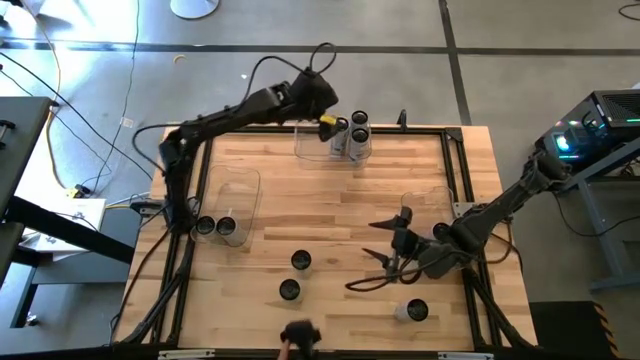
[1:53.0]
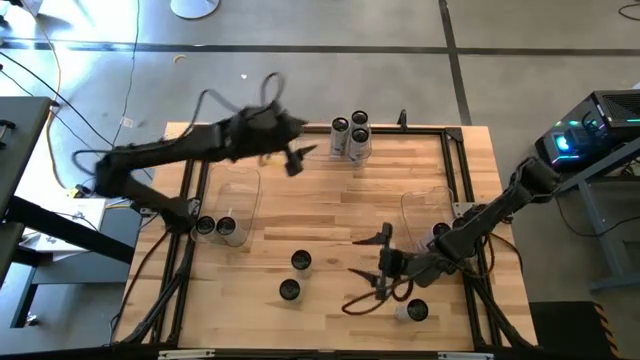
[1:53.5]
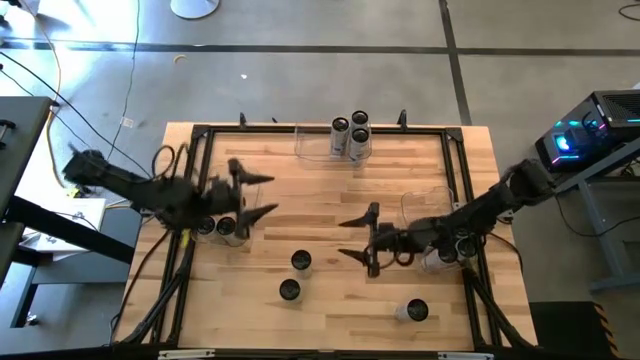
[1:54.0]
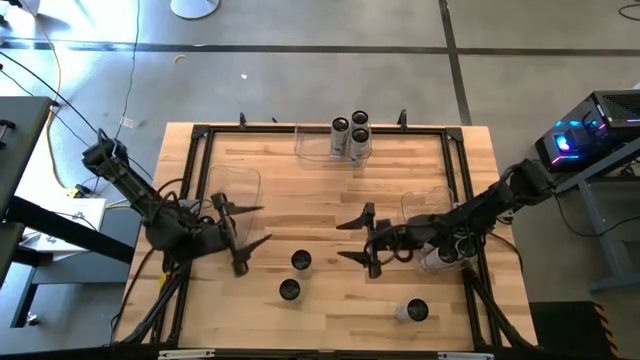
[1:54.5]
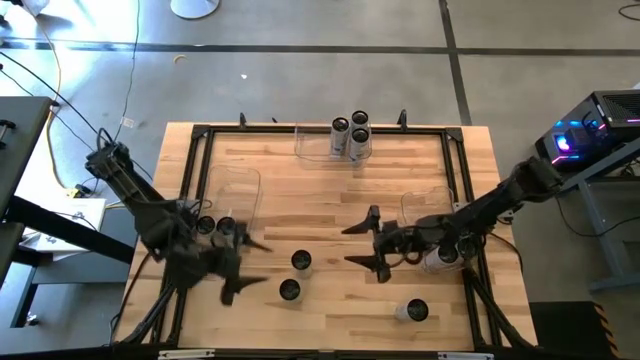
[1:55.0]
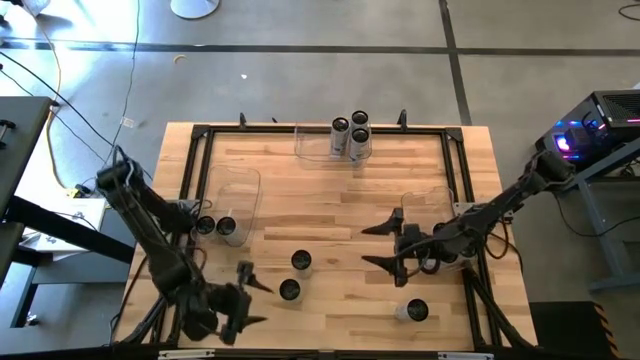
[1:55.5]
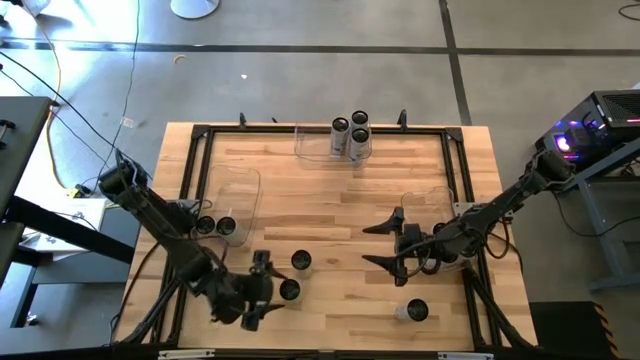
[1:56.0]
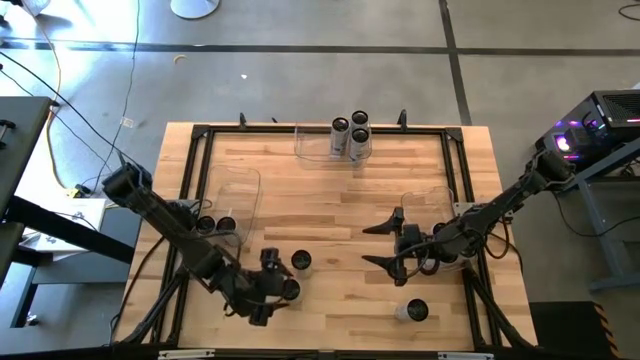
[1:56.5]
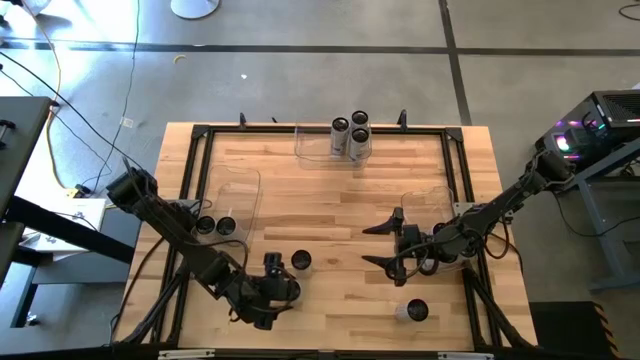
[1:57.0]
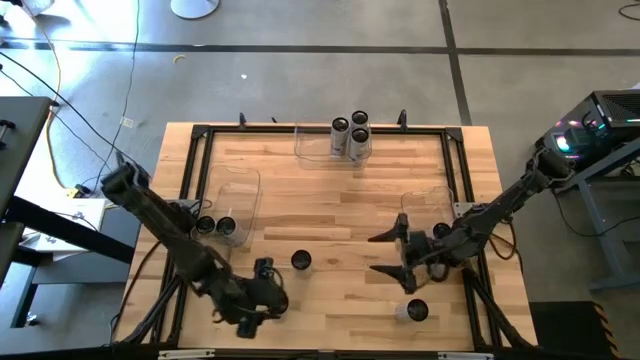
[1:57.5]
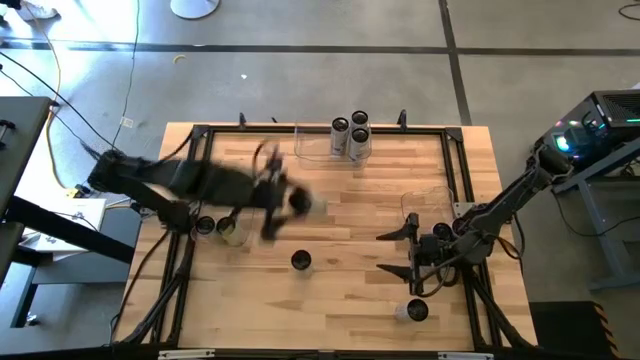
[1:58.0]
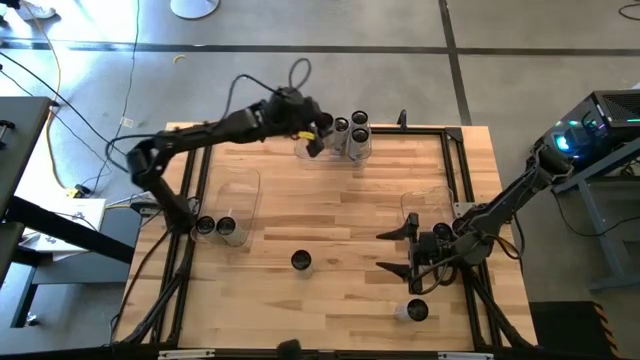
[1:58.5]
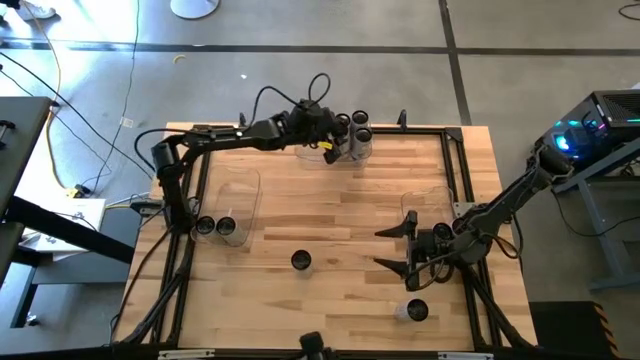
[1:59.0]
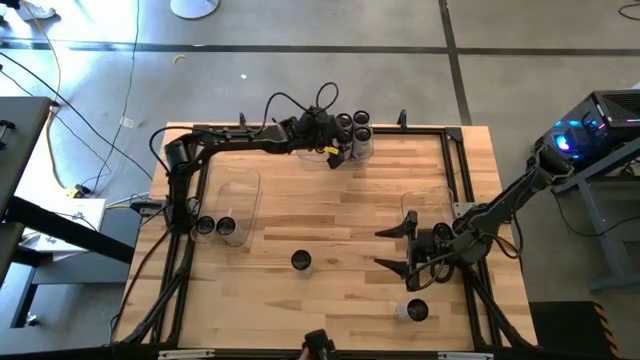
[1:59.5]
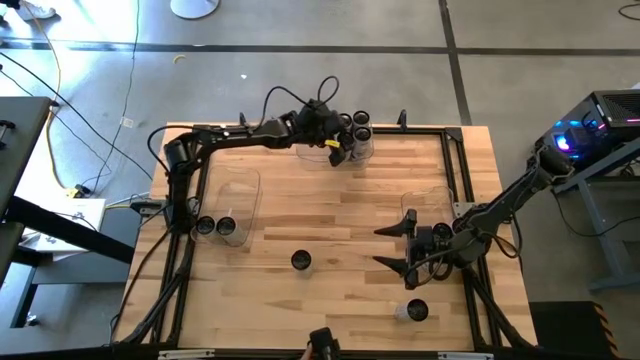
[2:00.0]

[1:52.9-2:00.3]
Task: Sort soda cans
Put the white-blue soda can into the middle transparent bin

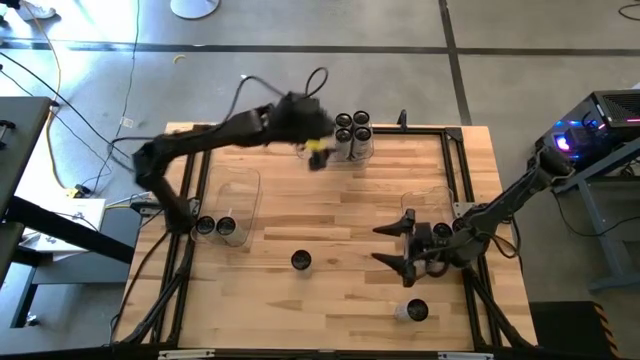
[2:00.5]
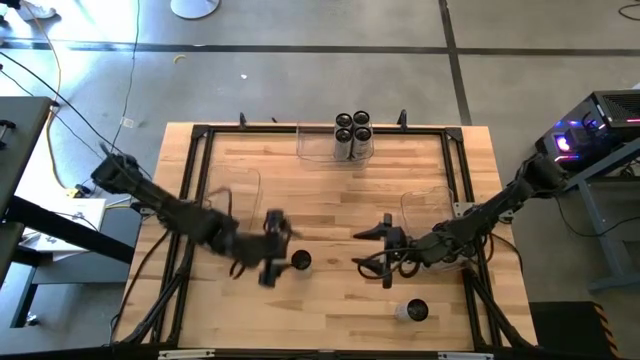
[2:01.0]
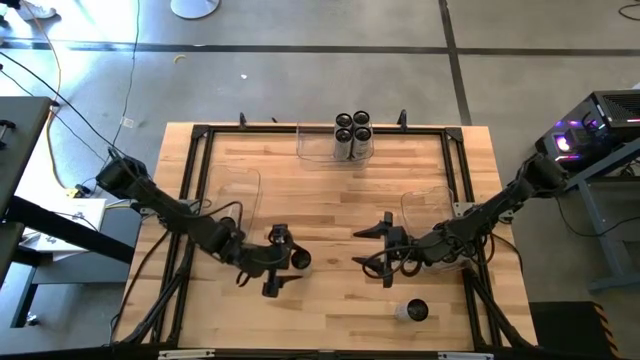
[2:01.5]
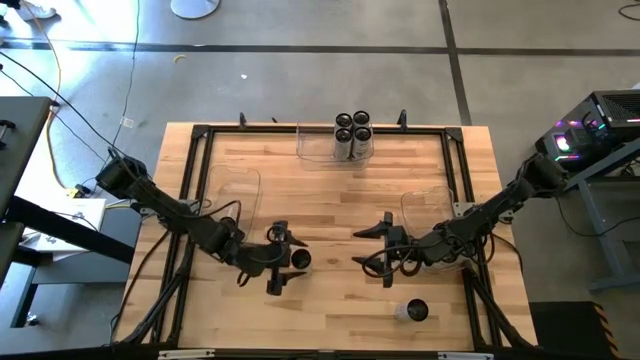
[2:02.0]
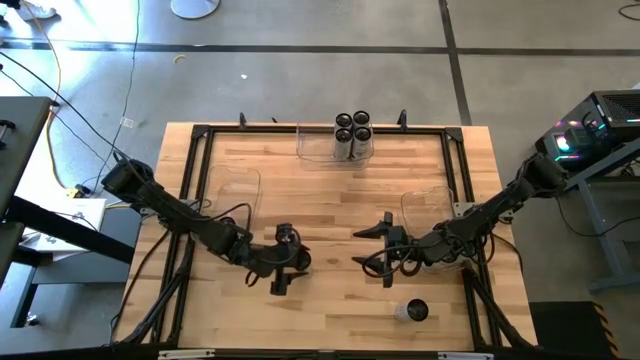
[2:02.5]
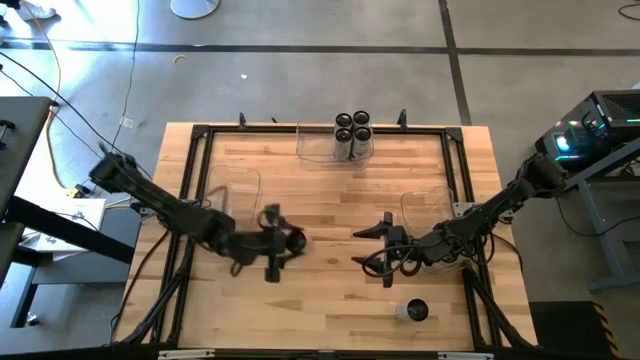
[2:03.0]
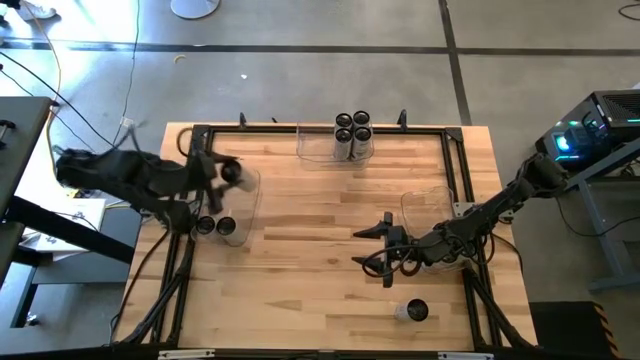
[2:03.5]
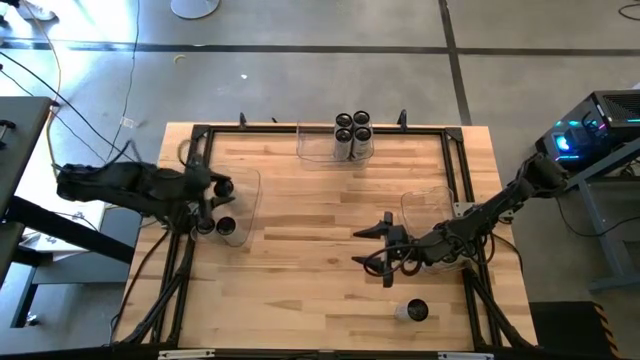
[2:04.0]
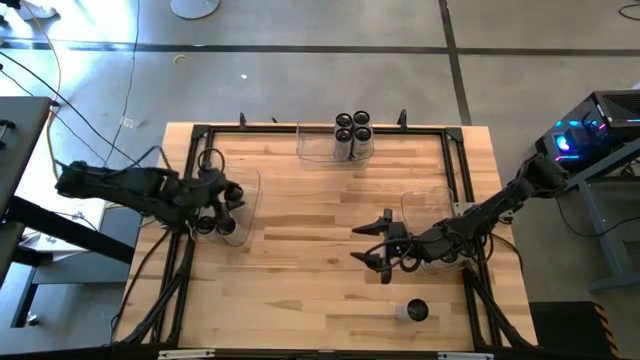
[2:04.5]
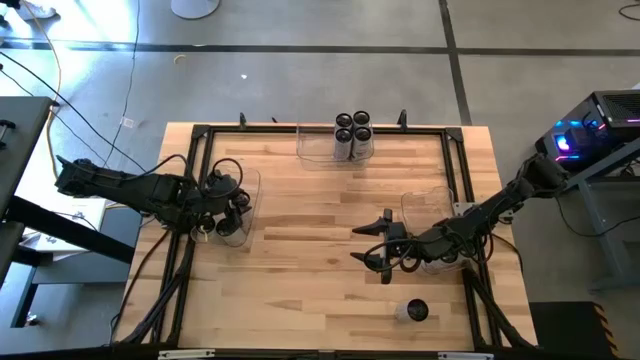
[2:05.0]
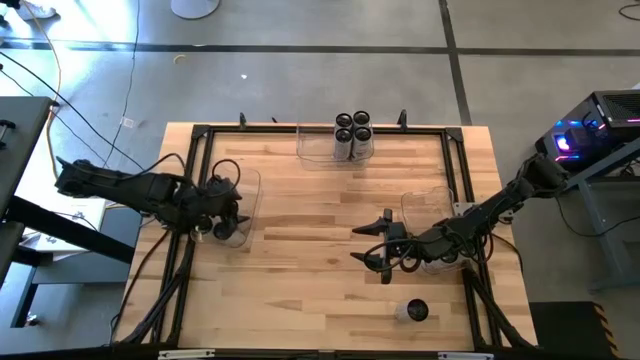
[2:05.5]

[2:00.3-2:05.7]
Put the white-yellow soda can into the left transparent bin

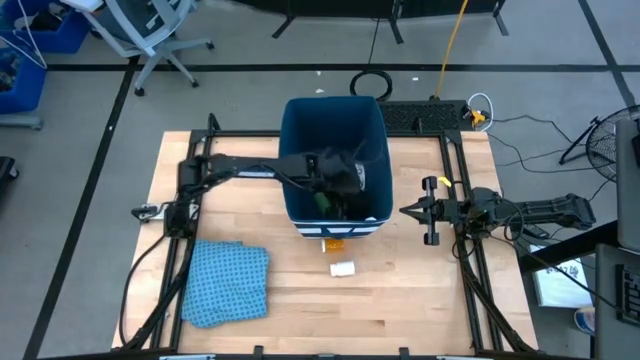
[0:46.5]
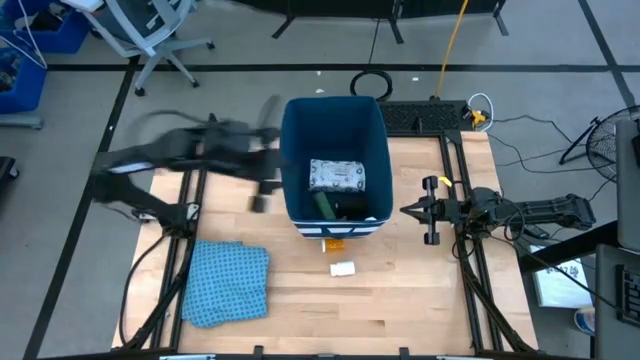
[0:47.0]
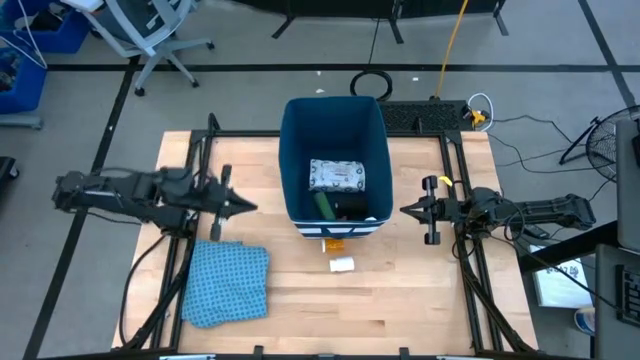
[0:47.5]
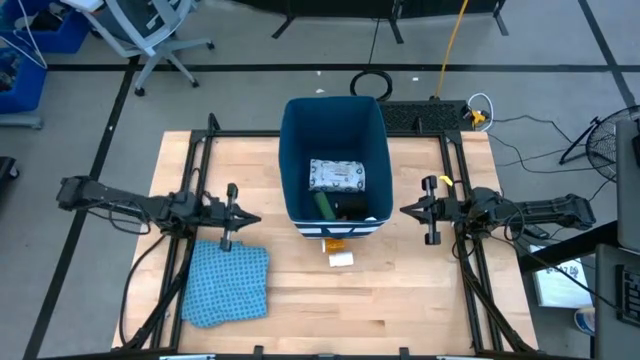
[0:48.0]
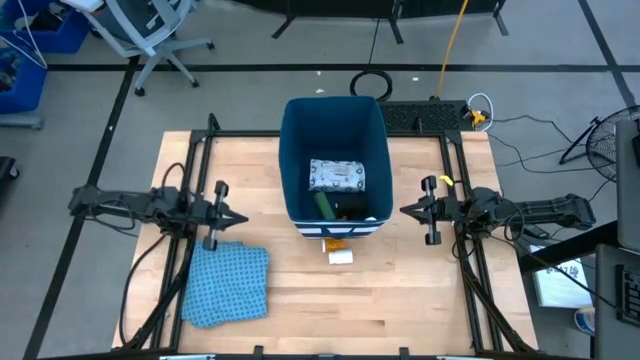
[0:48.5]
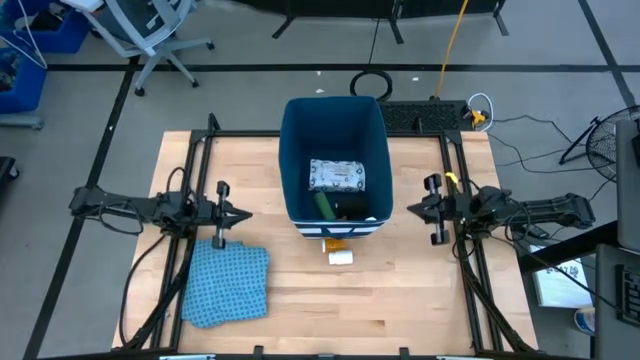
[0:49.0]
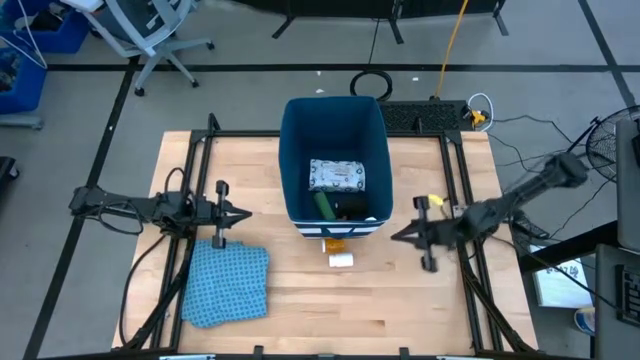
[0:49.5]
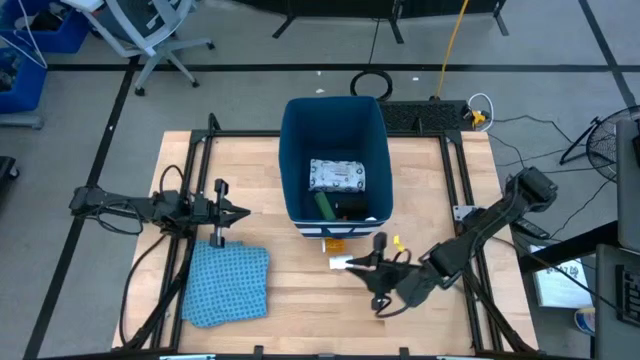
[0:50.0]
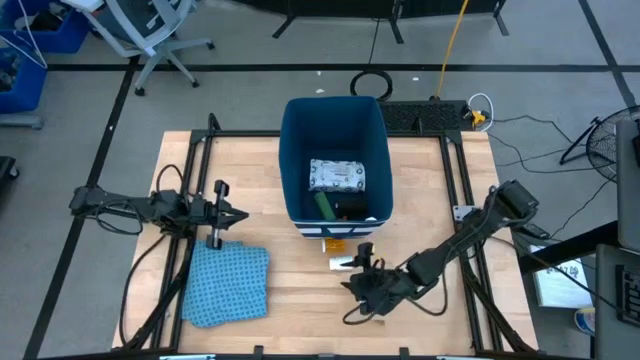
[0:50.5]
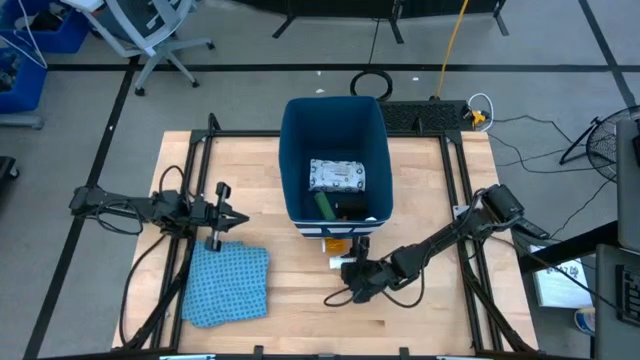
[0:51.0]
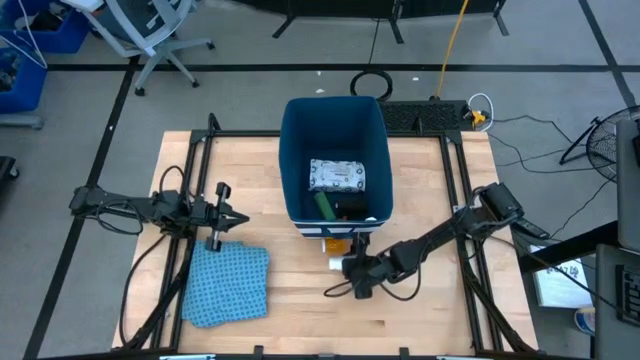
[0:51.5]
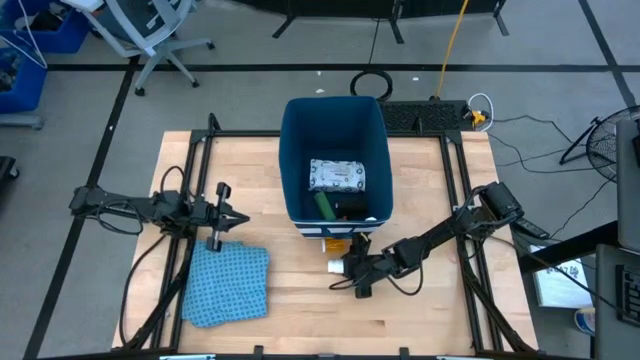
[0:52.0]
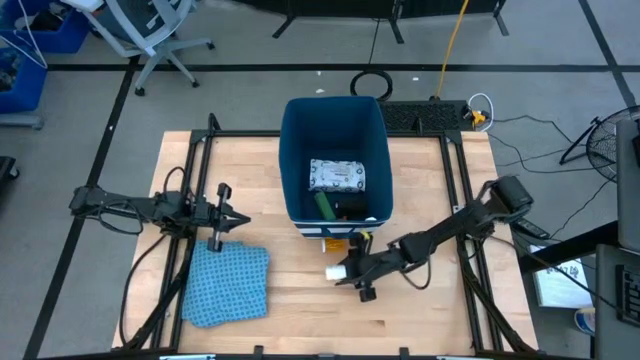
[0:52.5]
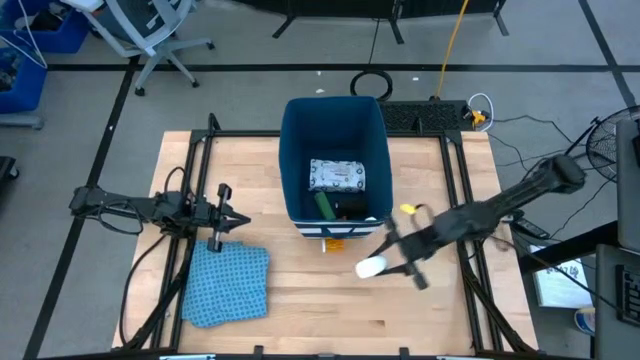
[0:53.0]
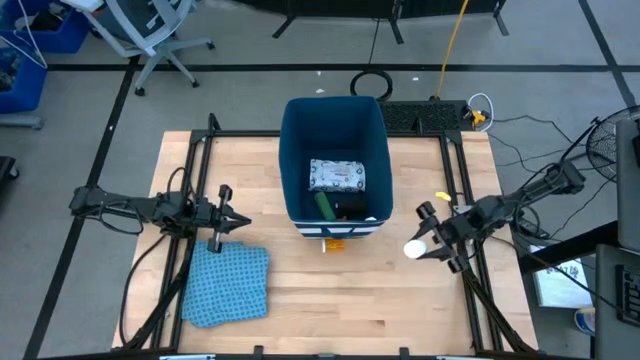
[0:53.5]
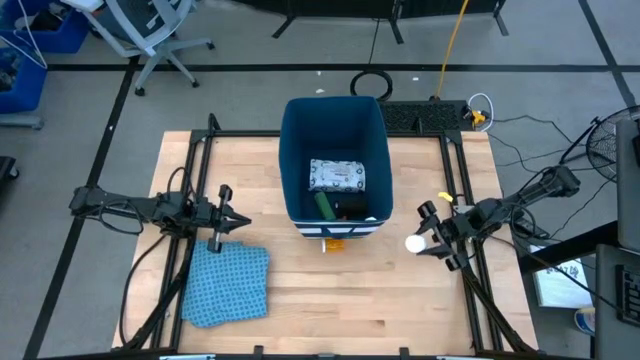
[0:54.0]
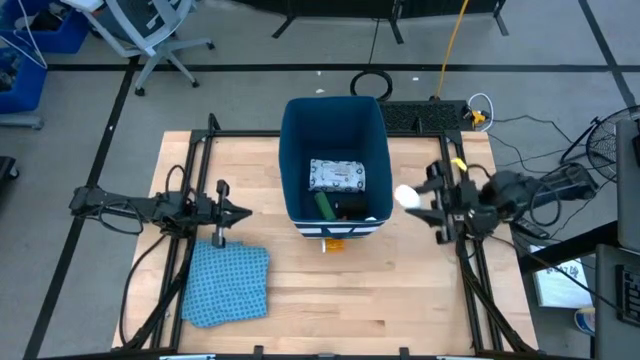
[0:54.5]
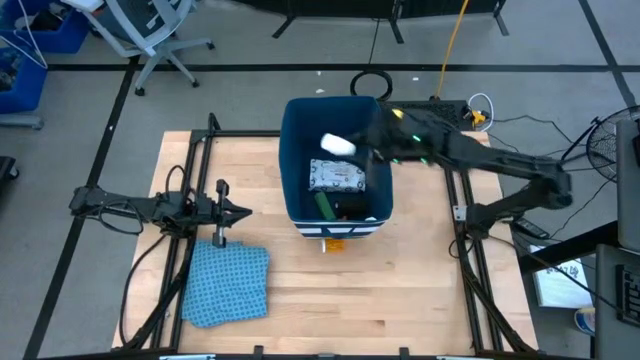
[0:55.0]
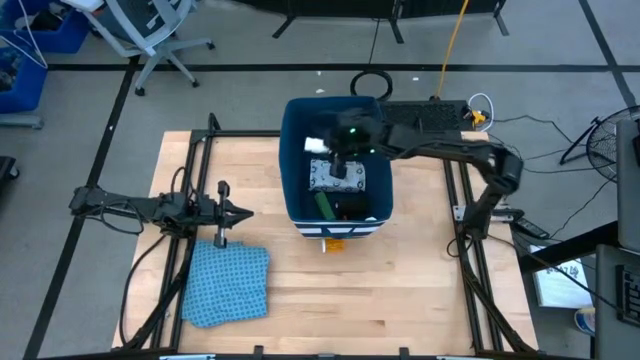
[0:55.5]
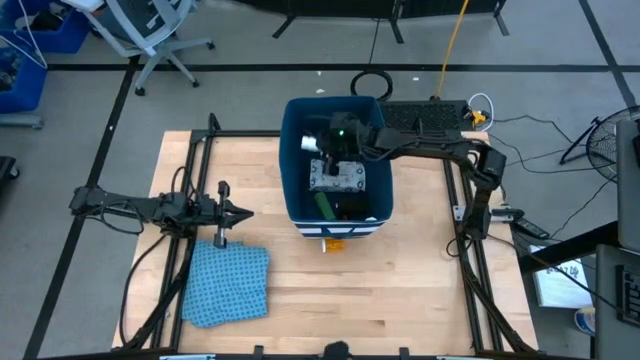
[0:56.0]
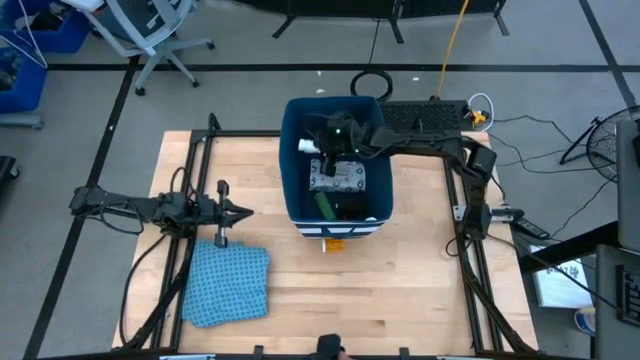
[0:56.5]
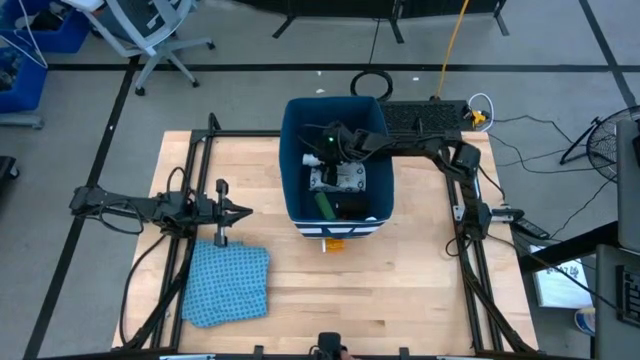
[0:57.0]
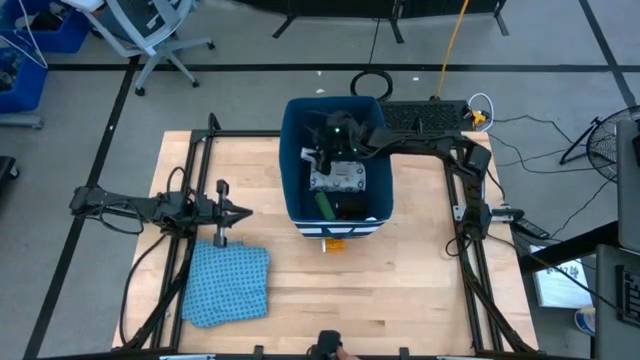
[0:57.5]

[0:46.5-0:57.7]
Task: Pick & place medical supplies in basket/bin
Put the white medicine bottle into the blue bin
